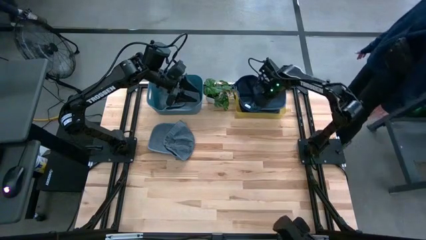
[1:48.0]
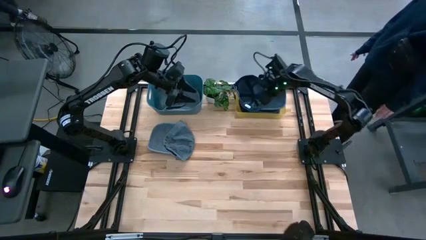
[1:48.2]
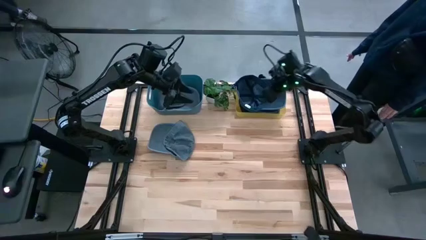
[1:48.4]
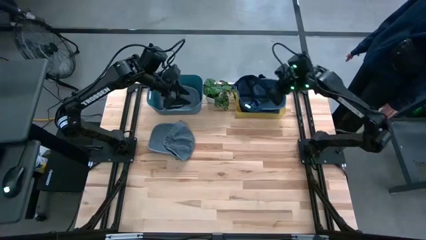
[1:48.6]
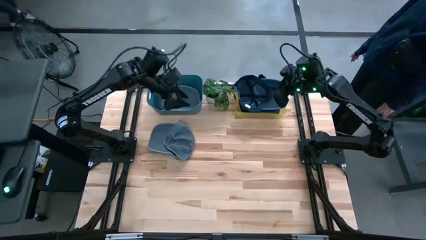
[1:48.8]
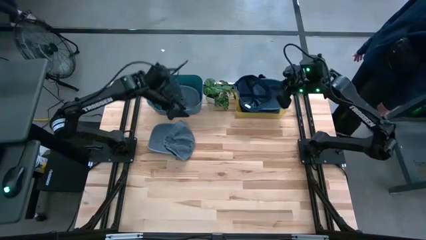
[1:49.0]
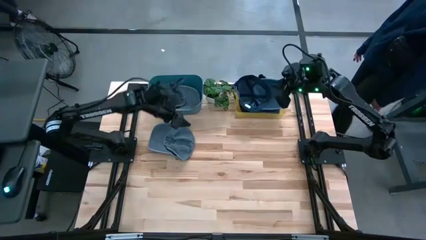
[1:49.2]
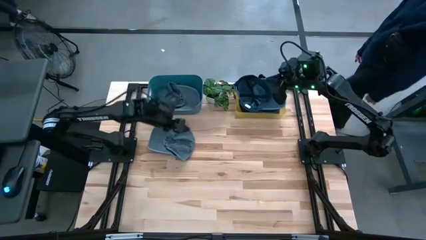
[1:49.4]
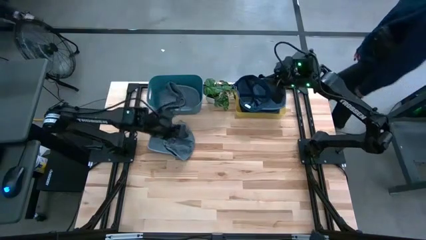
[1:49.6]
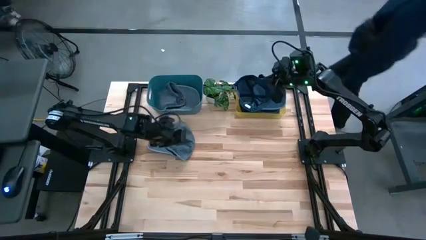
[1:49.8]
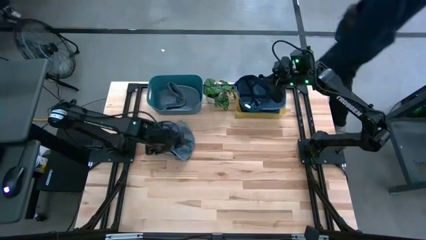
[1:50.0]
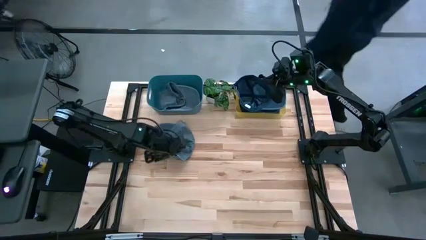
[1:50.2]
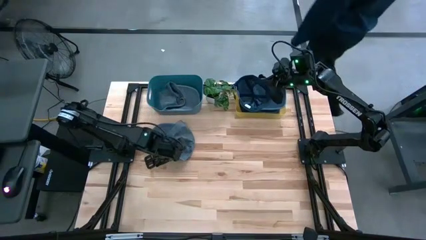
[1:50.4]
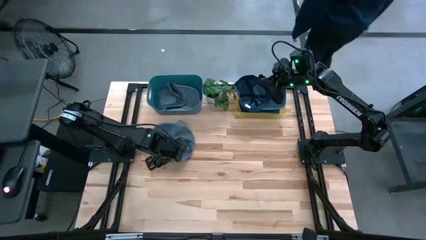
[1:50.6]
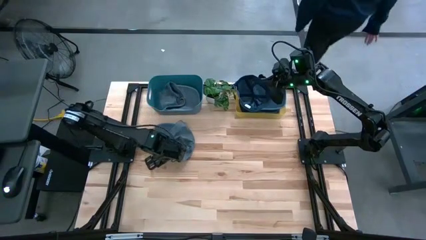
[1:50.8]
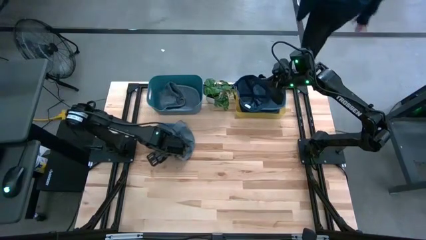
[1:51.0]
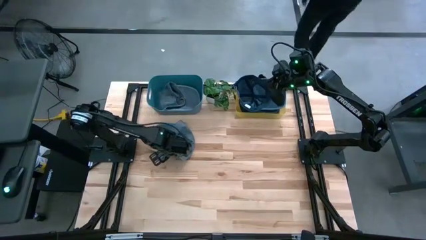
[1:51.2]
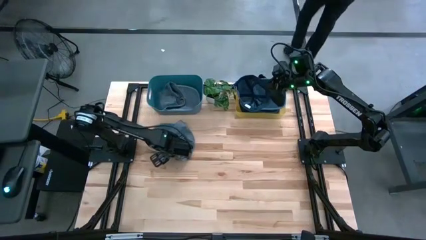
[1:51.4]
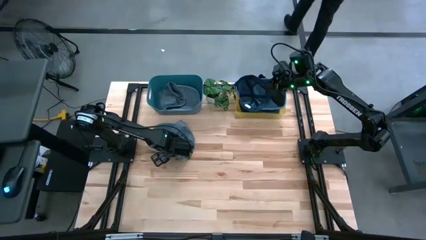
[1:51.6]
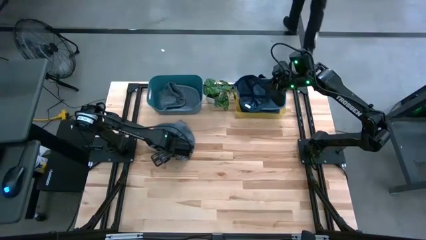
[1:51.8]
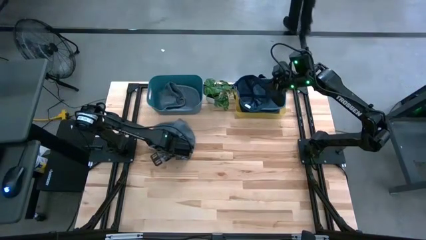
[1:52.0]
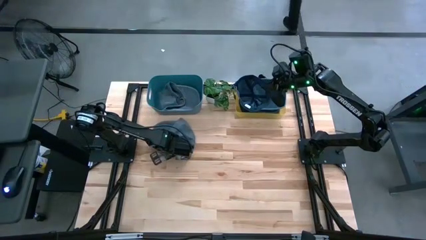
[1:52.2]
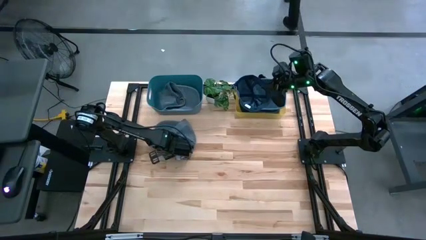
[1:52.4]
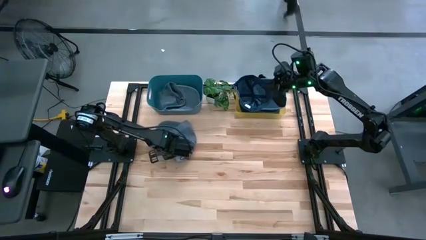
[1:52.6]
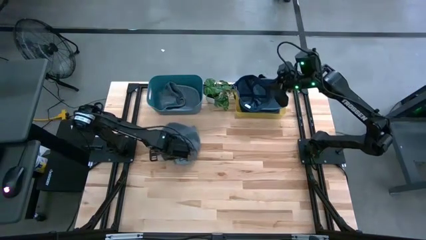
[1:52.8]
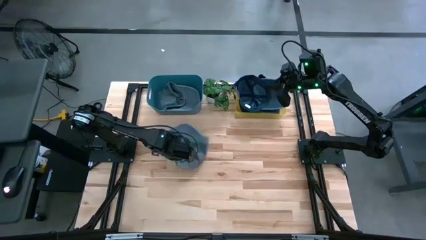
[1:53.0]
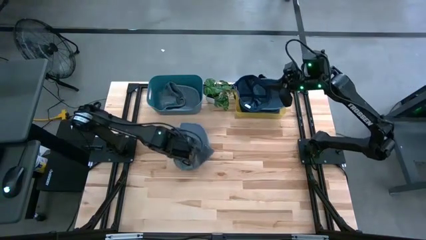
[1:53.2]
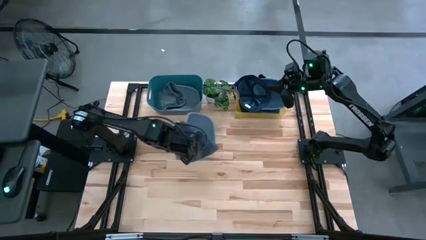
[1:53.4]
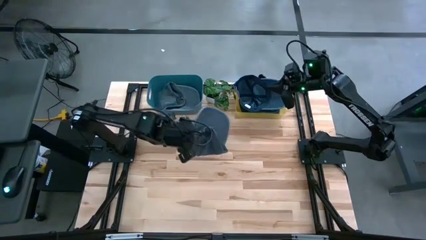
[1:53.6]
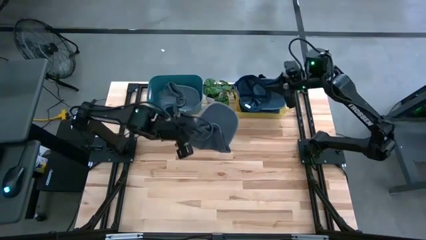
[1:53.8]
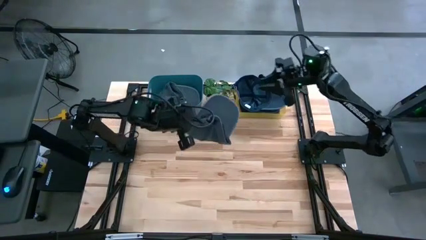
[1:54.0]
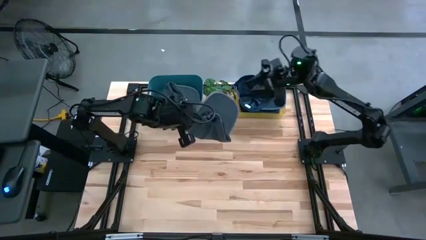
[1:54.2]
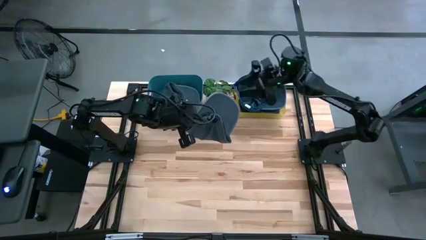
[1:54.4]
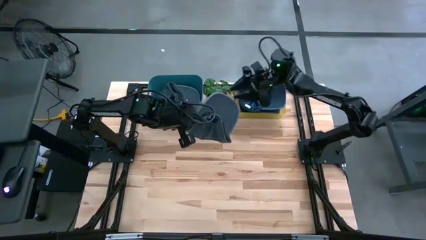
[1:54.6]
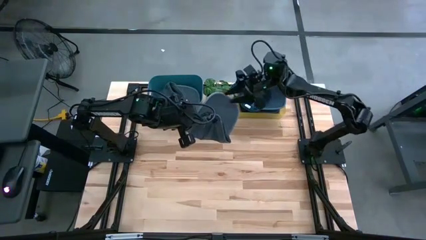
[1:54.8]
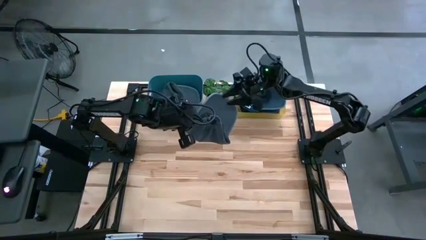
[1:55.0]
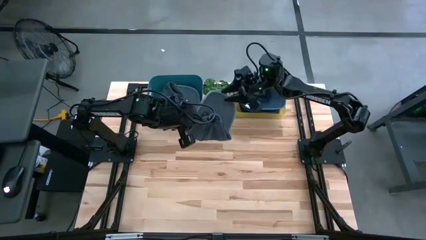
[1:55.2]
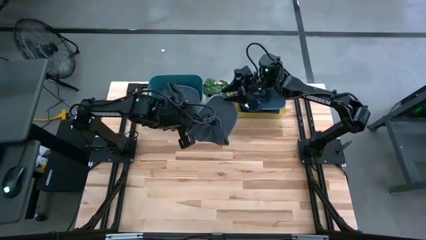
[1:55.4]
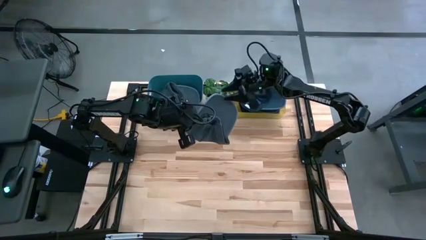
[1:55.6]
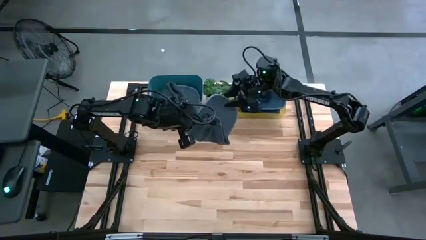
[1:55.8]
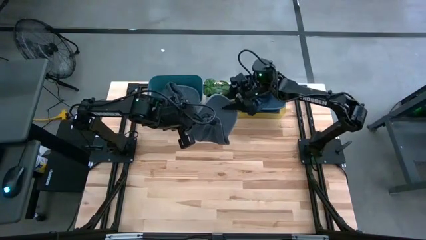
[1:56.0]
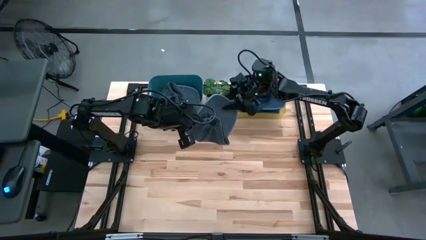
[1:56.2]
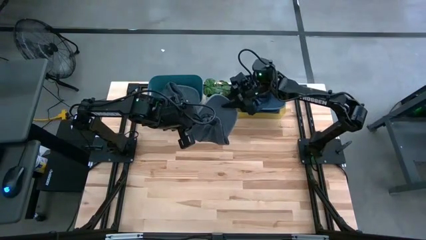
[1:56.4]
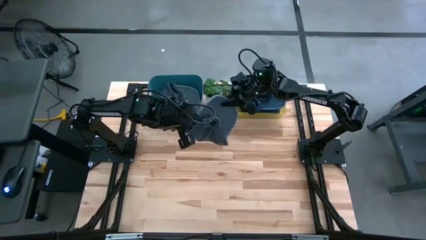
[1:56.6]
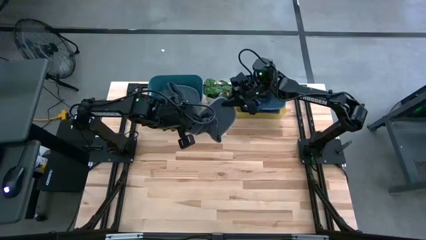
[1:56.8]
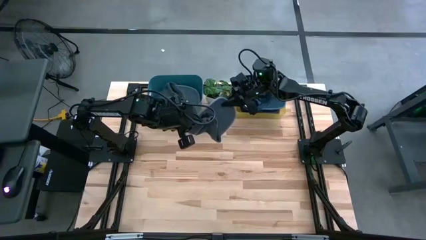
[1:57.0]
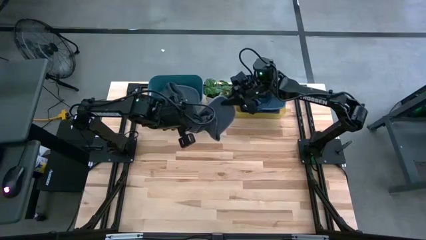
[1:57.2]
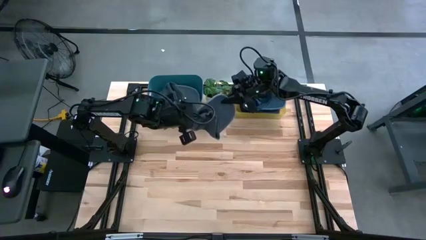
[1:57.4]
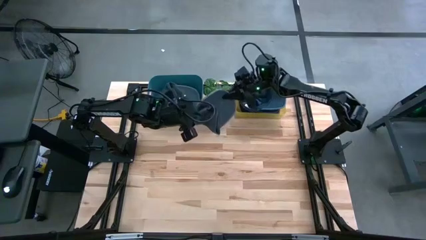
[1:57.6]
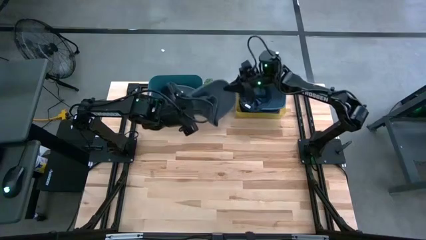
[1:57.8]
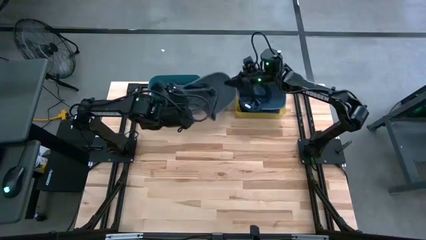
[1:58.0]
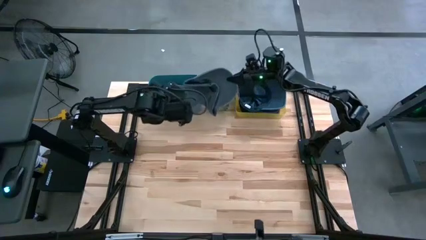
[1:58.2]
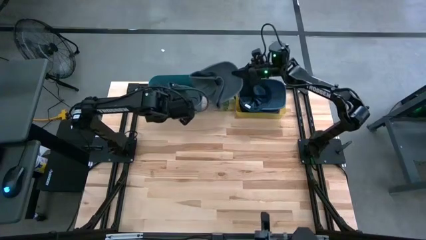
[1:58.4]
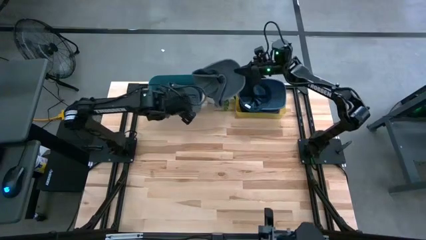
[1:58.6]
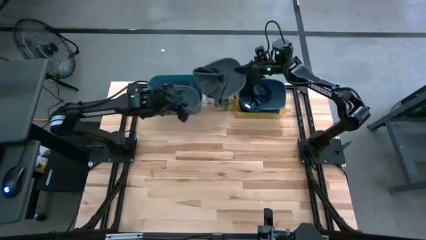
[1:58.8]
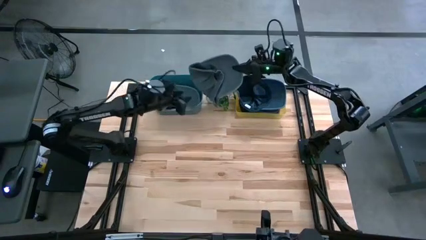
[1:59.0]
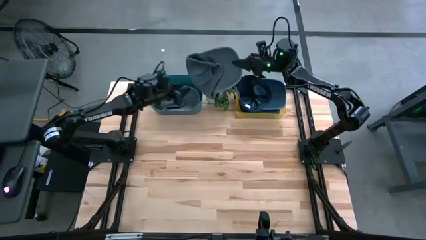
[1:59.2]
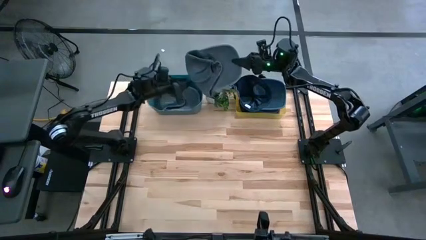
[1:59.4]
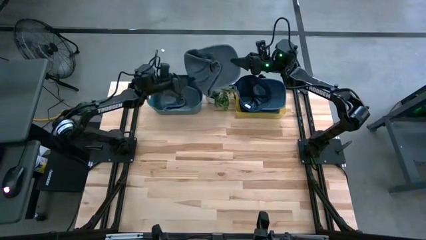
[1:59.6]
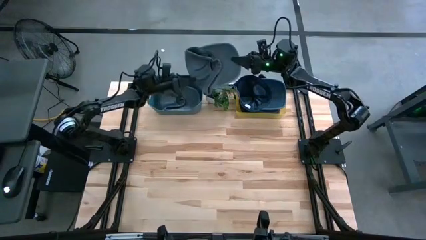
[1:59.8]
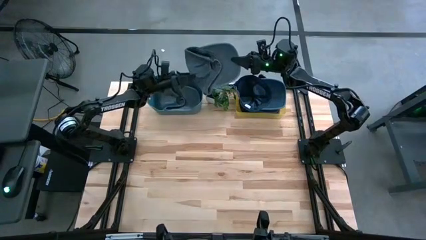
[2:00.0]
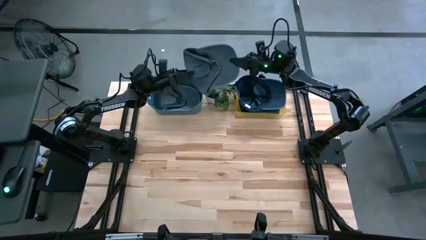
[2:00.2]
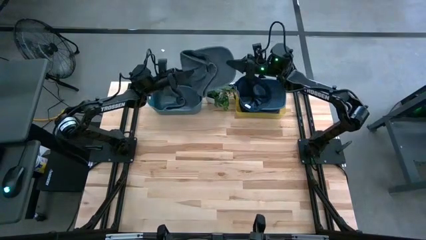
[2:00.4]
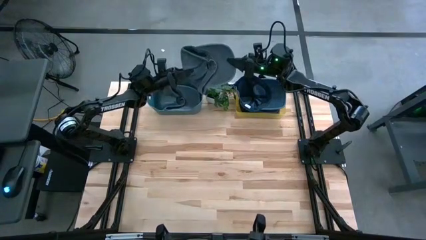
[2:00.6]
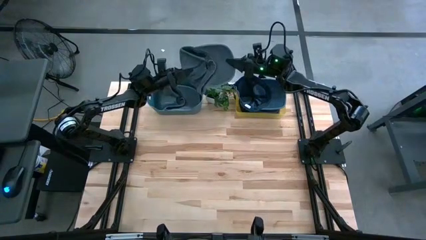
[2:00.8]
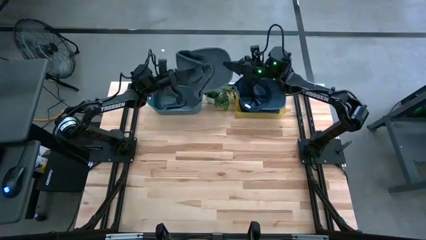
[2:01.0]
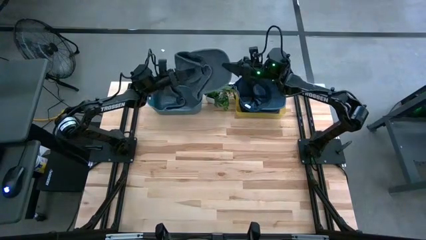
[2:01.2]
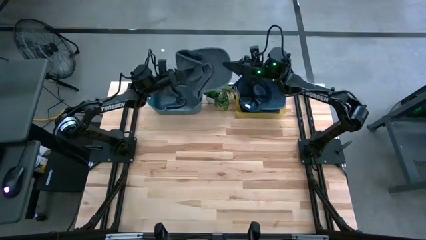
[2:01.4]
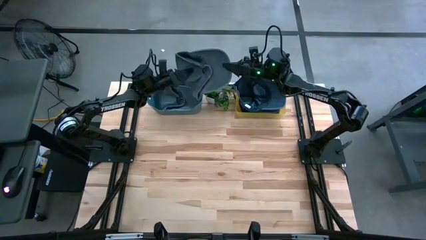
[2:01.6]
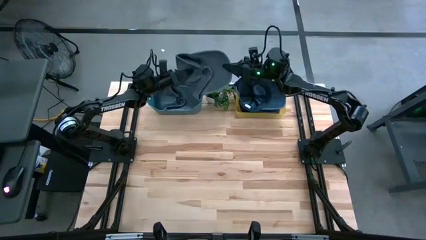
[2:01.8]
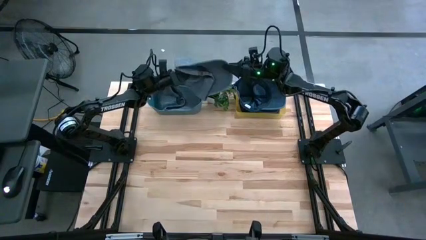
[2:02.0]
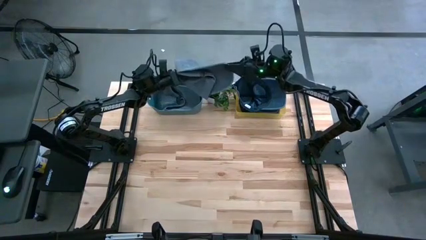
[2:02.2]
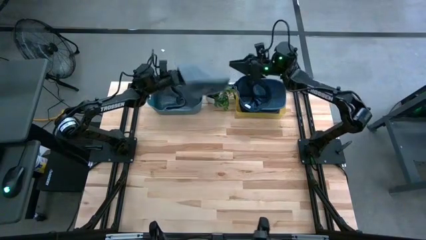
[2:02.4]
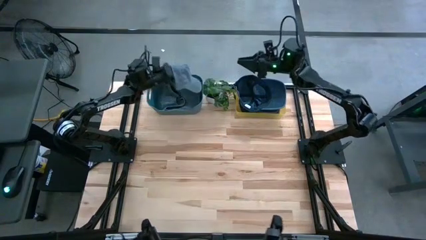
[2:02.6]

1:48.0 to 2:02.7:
Task: Pick & Place hat
Put the gray cap into the green bin

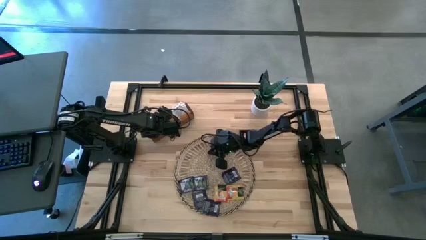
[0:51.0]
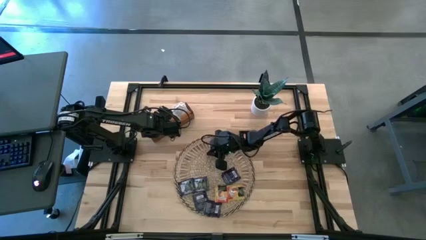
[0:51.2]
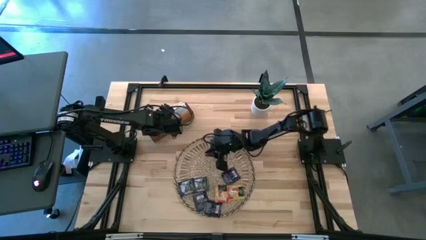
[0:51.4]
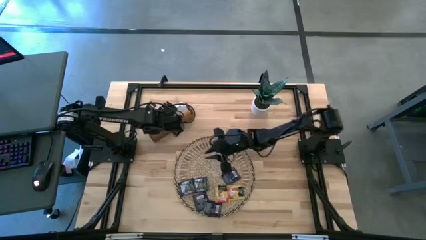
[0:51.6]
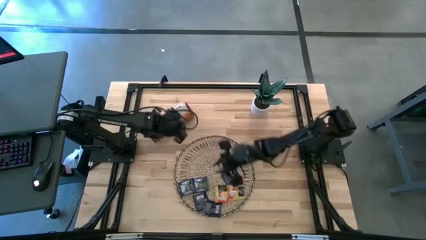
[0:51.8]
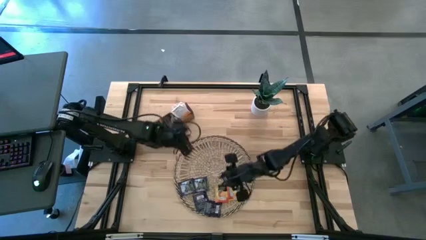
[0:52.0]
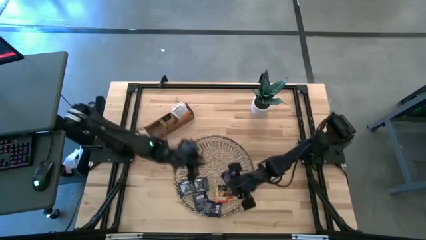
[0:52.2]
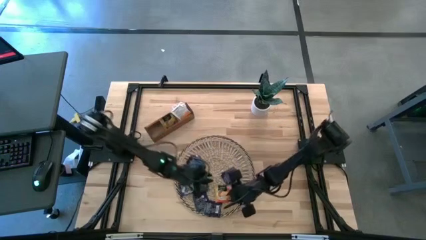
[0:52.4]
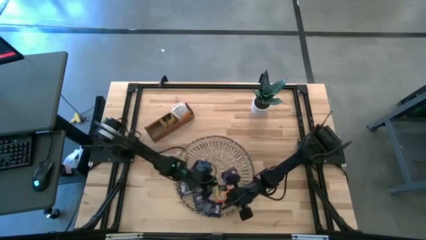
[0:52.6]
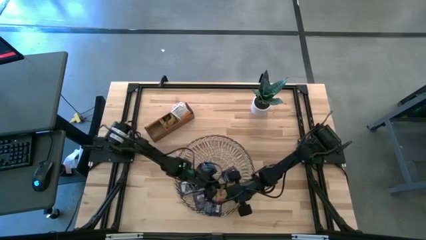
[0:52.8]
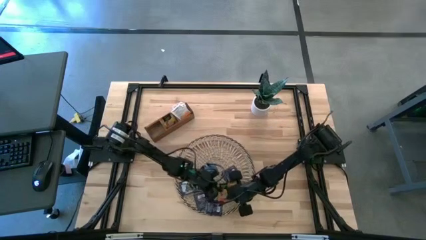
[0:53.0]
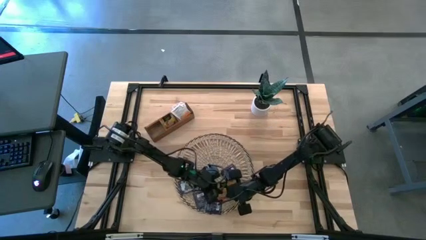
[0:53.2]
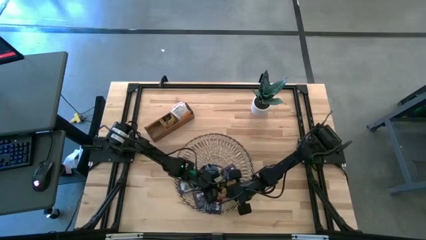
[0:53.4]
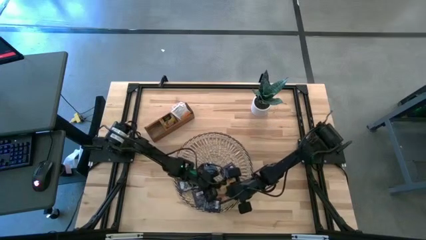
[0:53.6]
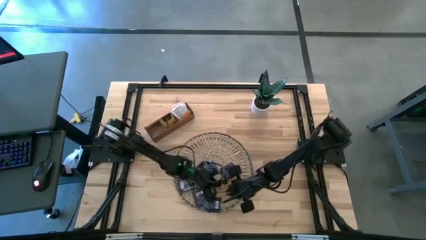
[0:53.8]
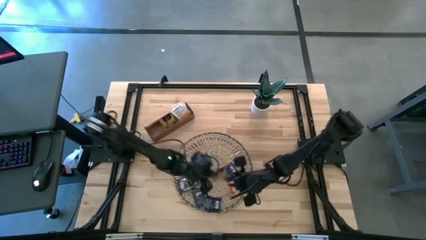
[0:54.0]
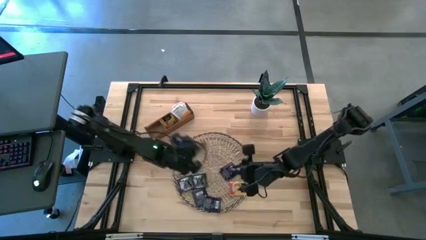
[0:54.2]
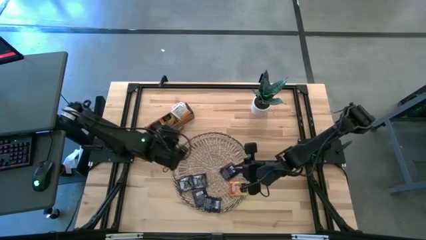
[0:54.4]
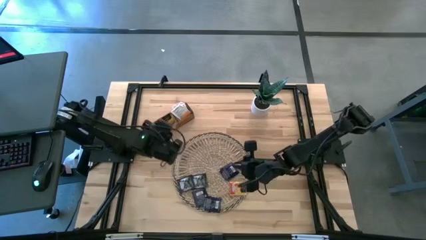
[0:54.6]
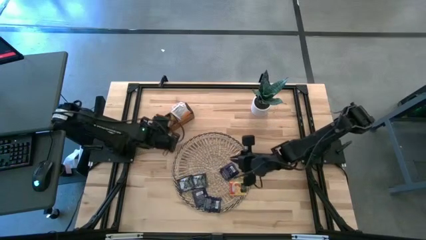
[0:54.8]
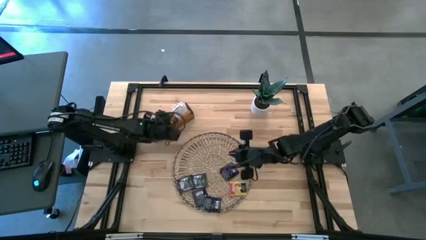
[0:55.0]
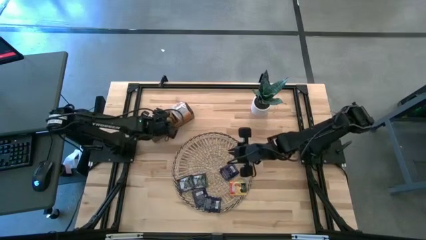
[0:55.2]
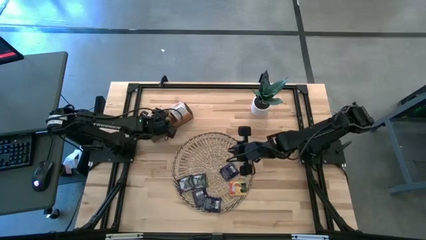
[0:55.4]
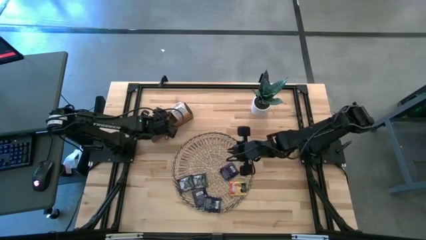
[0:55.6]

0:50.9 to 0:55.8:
Task: Pick & Place Tea
Put the left orange tea bag into the middle compartment of the wooden organizer
